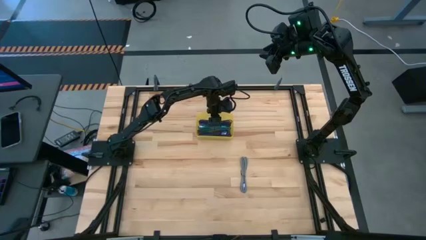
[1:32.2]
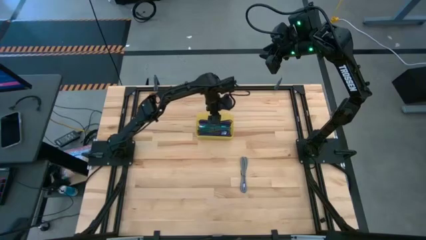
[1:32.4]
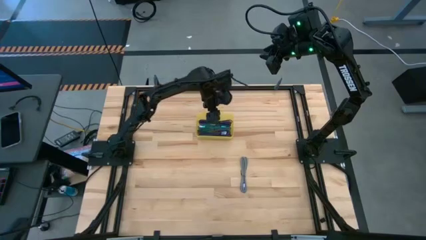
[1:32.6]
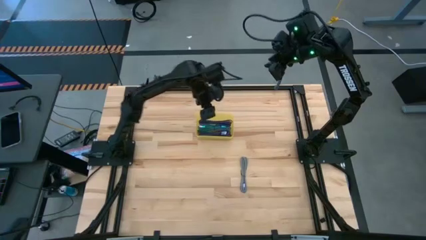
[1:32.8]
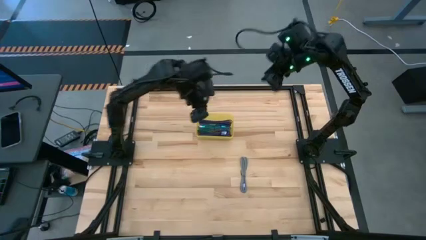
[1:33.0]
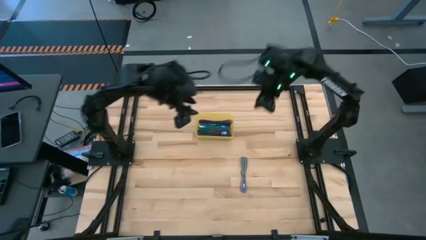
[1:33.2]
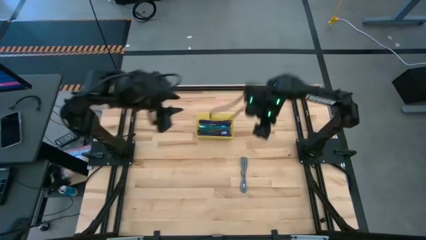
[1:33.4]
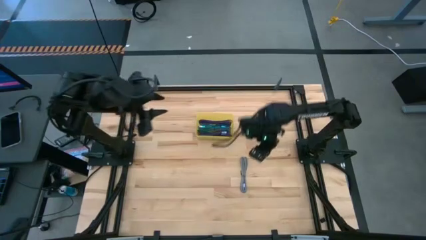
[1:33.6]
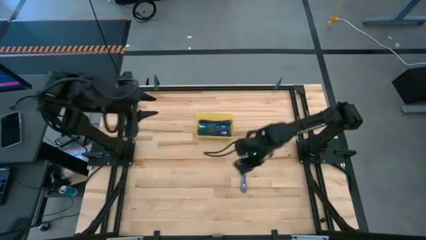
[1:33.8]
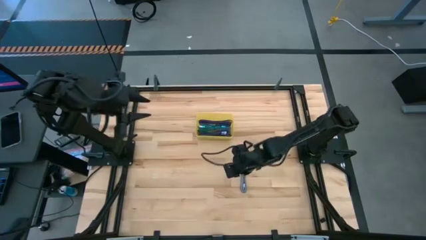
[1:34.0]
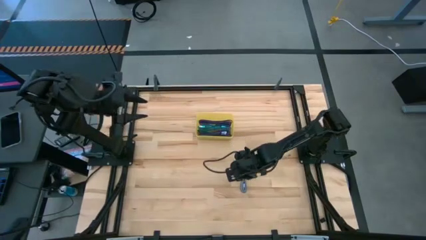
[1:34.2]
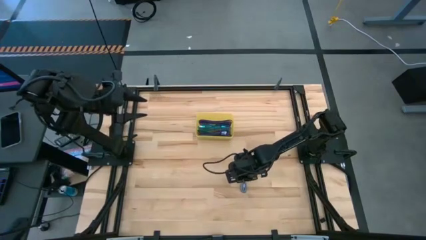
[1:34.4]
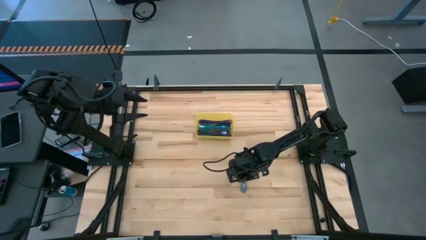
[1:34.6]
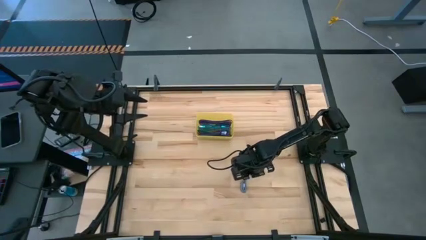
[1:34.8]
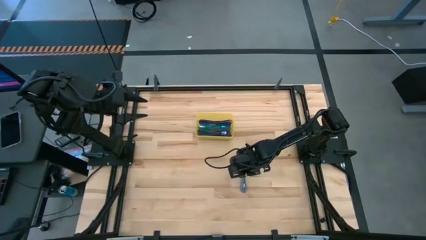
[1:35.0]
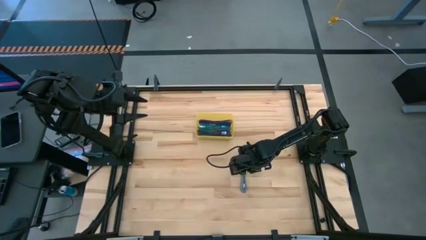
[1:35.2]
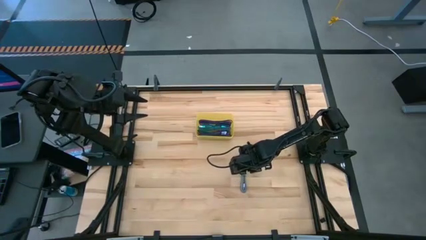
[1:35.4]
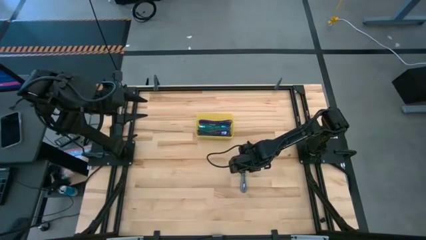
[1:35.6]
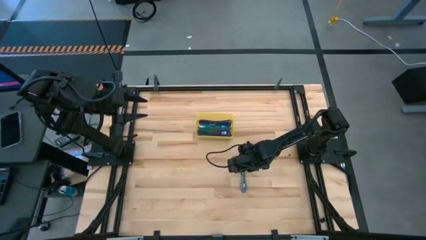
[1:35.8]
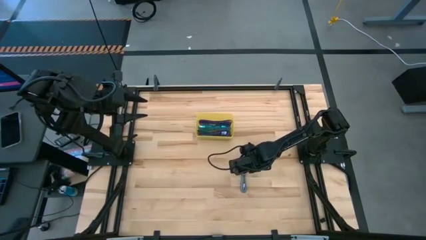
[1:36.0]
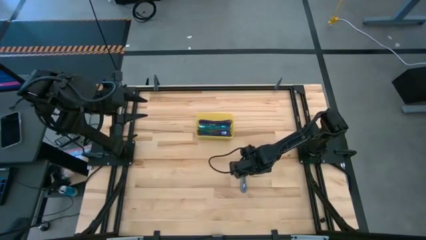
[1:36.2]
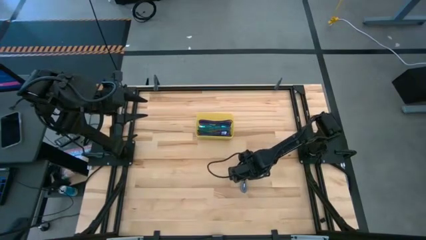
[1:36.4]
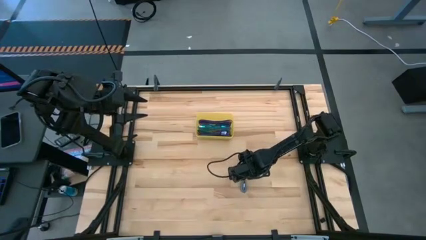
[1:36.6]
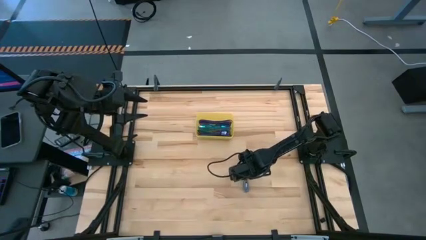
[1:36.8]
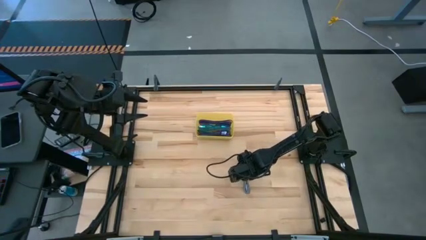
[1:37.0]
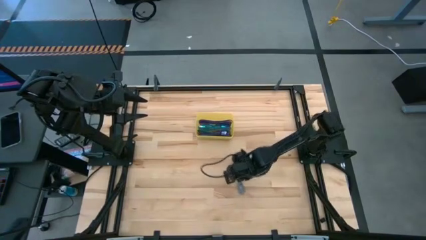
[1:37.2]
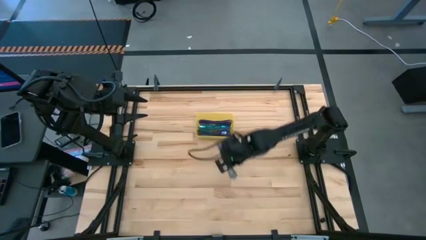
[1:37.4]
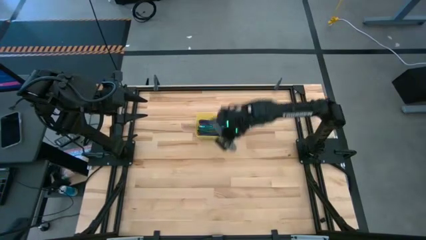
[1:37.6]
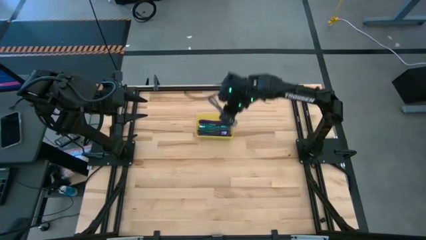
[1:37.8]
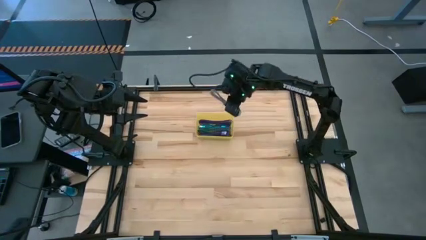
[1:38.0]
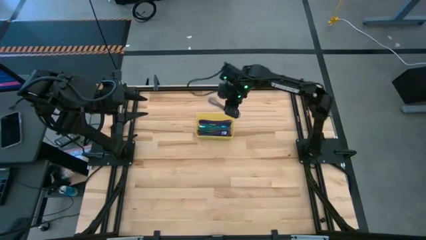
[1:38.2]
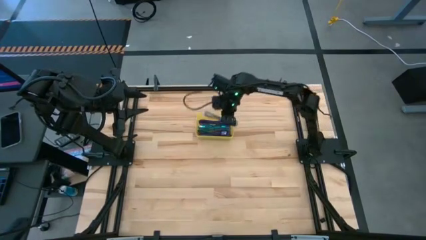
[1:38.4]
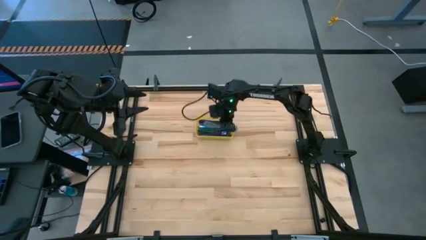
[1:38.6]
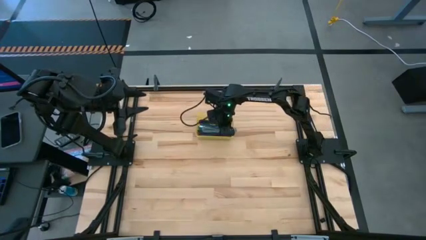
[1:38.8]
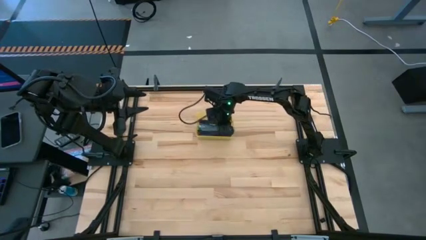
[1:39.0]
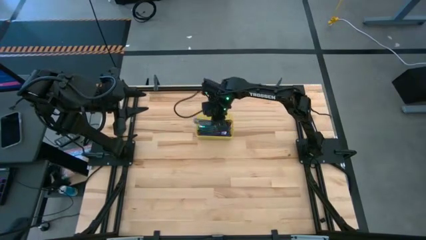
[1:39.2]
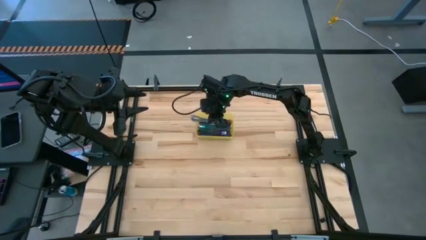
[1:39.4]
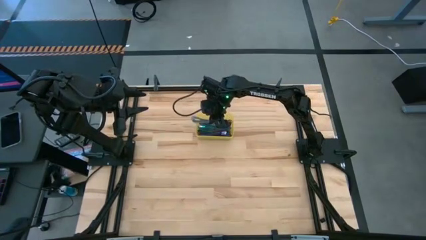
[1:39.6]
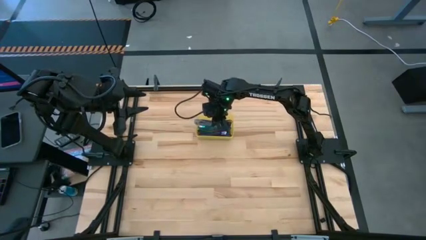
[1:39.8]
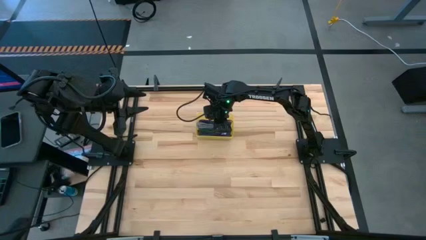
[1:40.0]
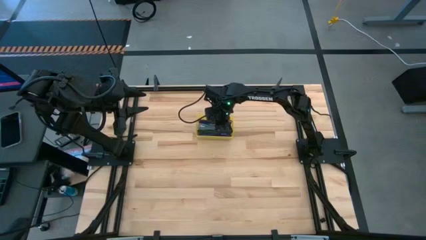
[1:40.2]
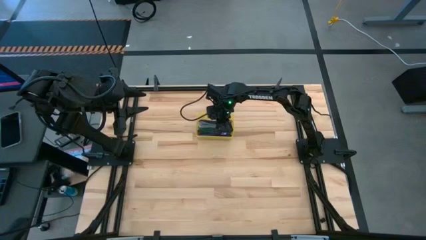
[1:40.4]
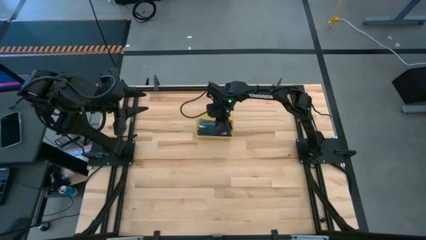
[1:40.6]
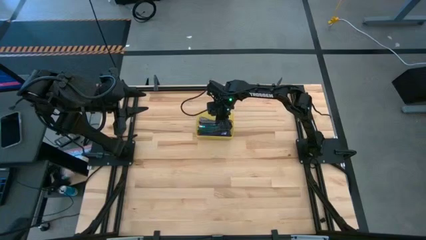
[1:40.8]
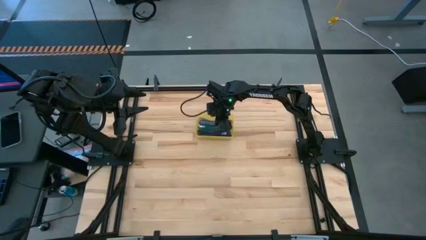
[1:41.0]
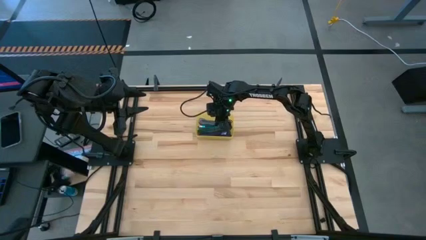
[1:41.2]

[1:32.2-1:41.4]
Task: Pick and place USB-C Cables
Put the white charger cable into the bin

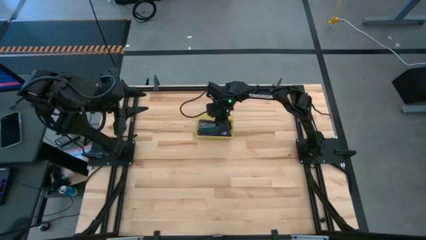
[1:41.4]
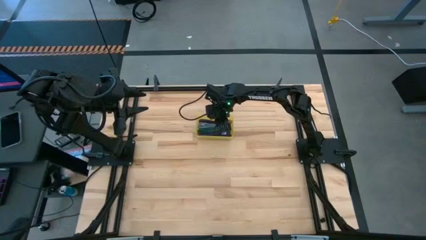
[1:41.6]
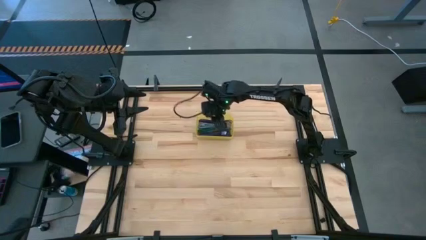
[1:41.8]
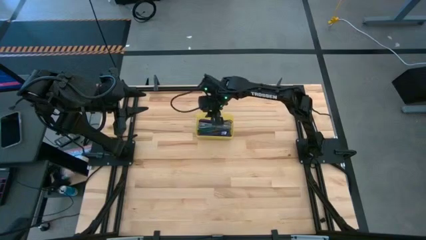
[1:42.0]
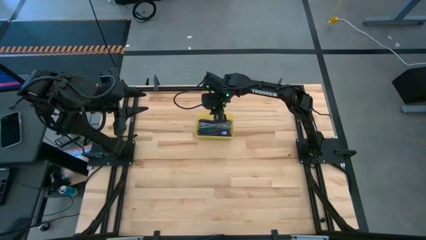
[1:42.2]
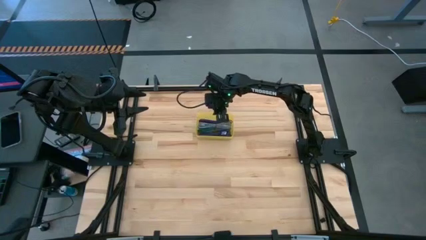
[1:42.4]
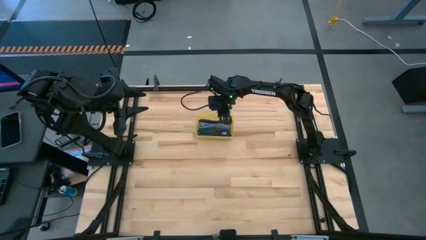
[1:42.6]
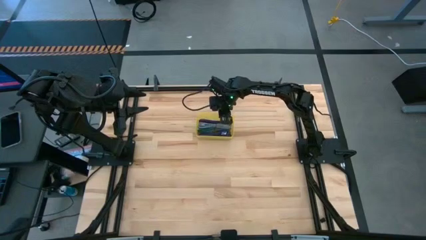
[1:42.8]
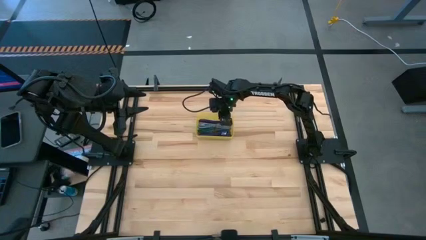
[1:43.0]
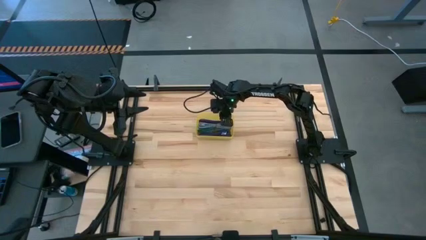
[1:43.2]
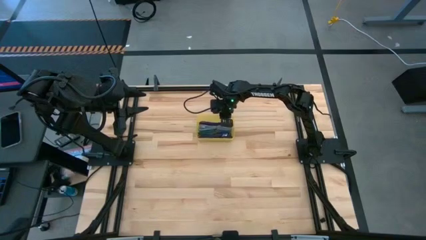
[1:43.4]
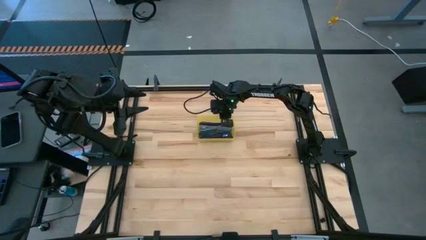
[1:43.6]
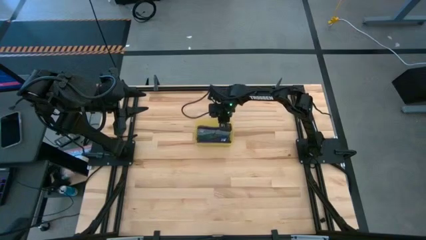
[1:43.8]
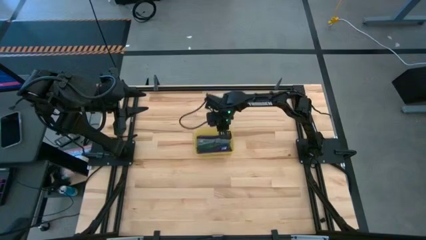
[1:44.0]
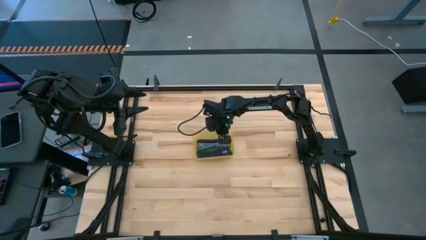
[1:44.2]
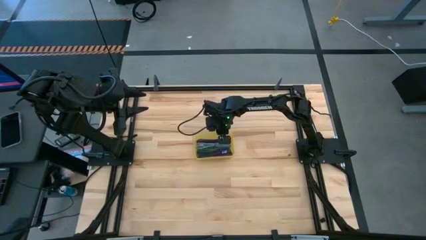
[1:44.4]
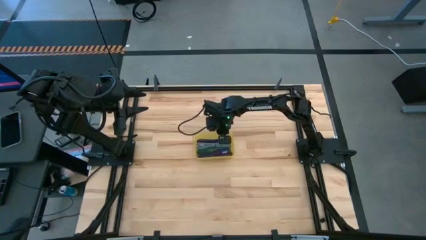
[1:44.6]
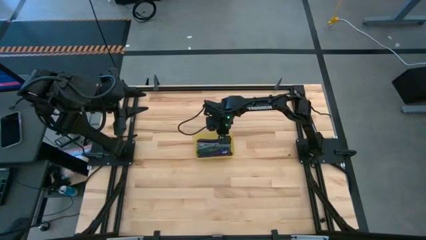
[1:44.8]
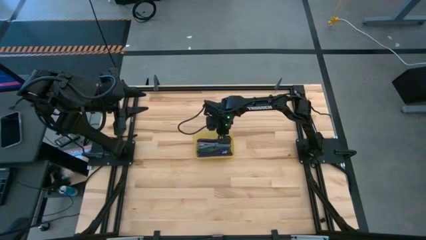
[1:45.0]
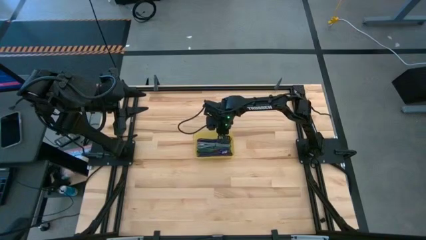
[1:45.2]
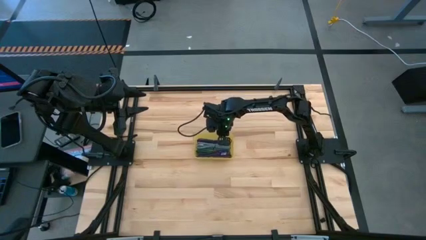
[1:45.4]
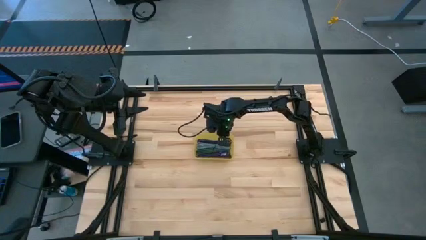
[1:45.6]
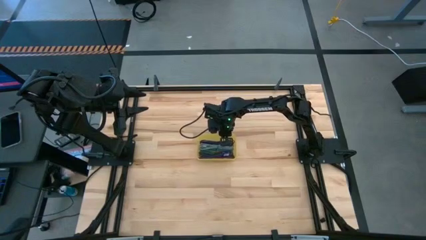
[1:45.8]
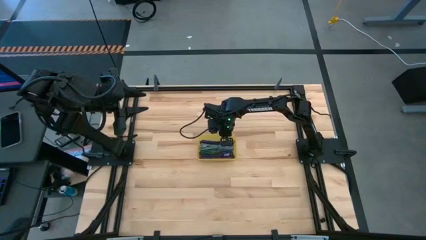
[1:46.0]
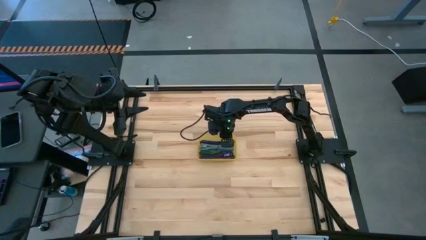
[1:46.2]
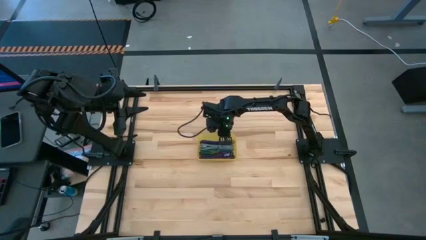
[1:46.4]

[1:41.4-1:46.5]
Move the bin to the center of the table
